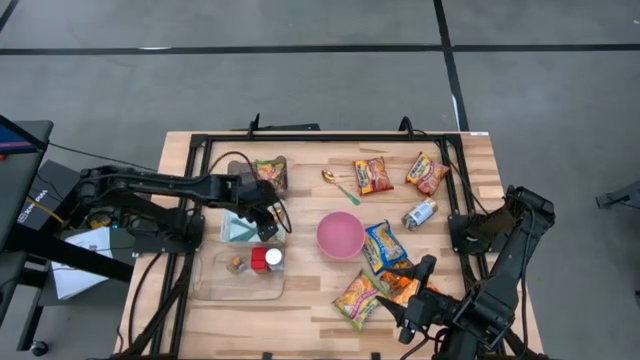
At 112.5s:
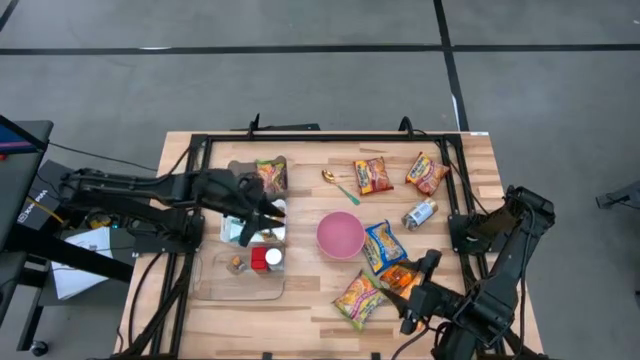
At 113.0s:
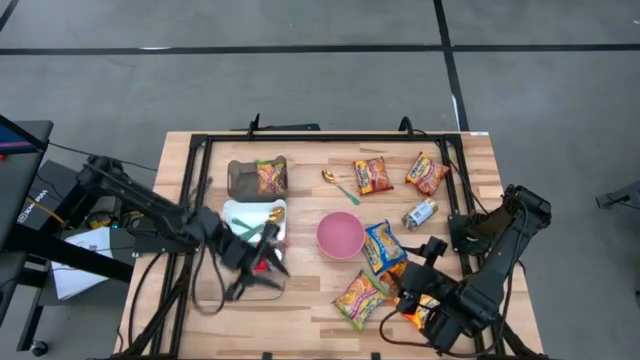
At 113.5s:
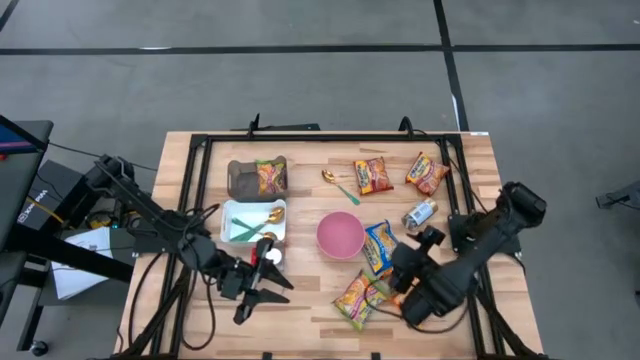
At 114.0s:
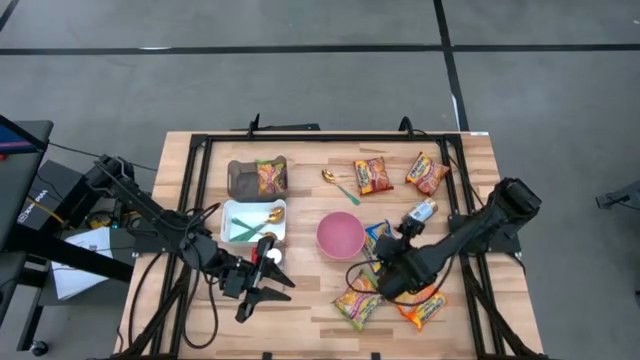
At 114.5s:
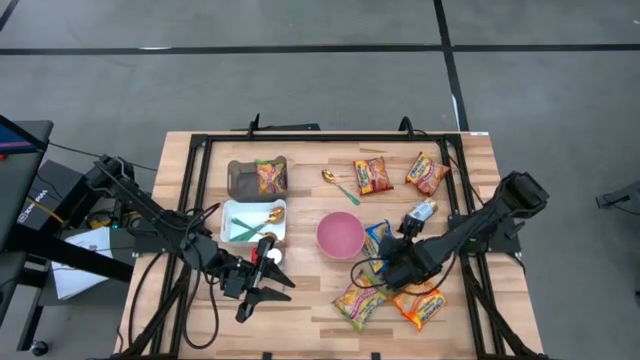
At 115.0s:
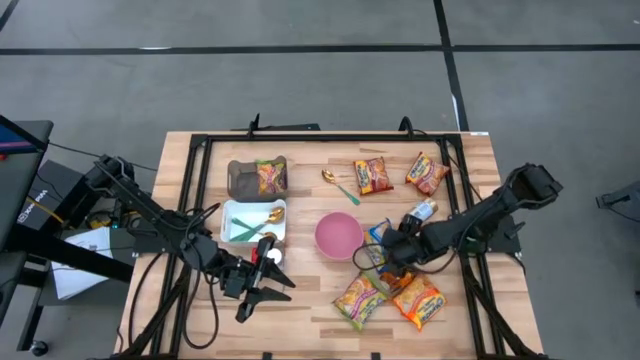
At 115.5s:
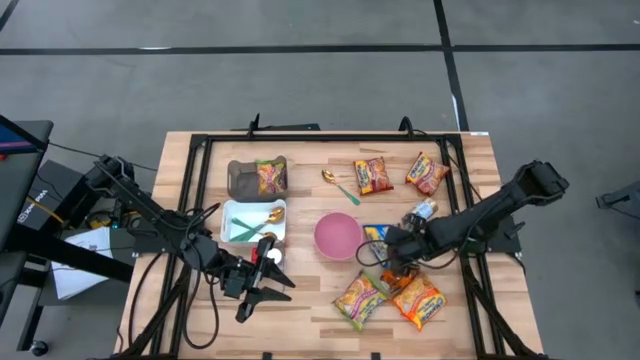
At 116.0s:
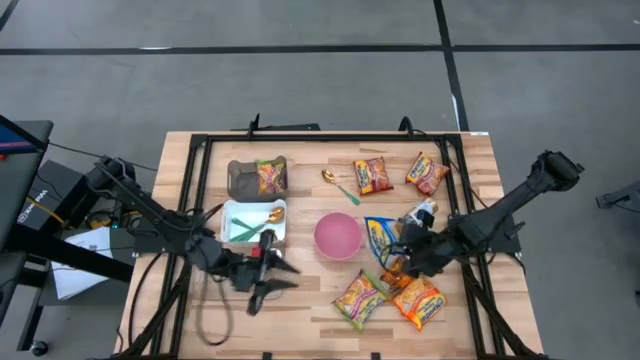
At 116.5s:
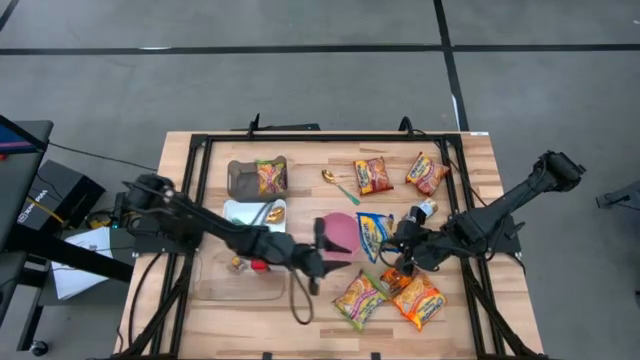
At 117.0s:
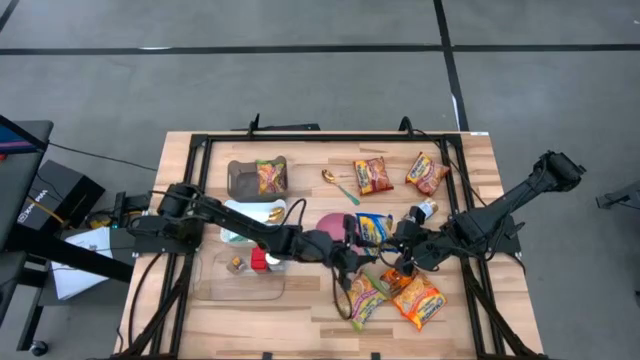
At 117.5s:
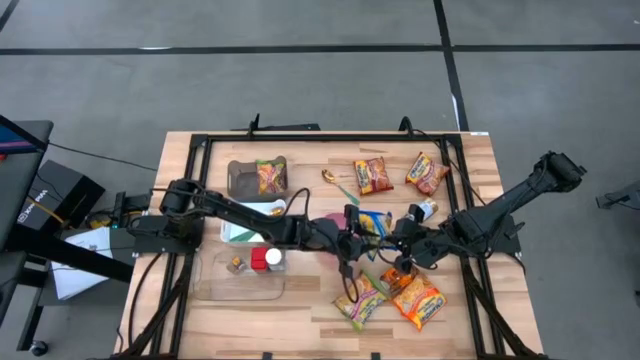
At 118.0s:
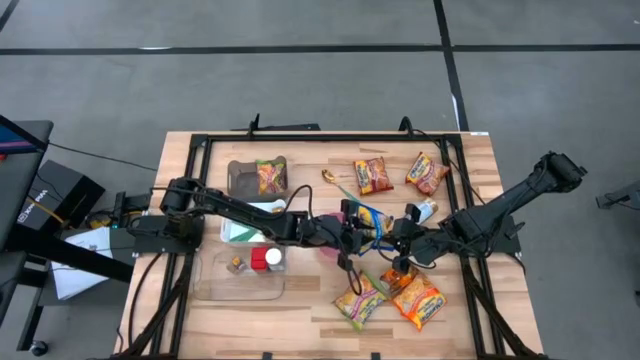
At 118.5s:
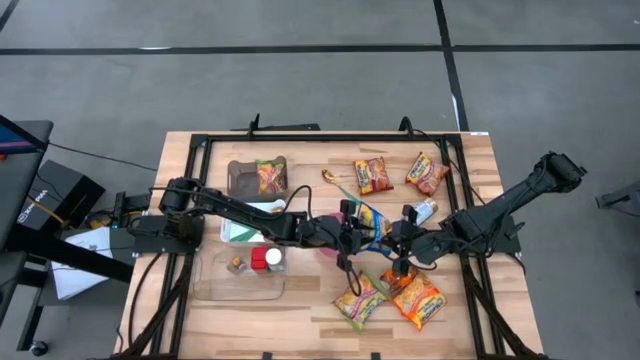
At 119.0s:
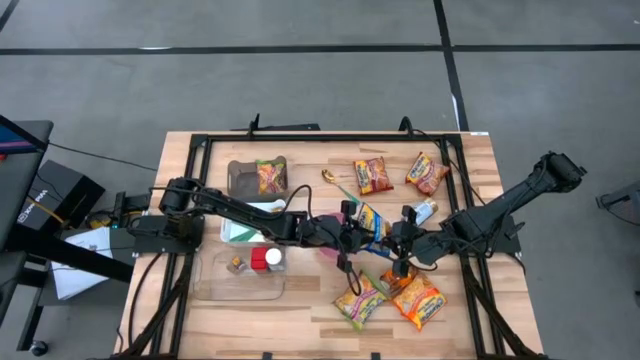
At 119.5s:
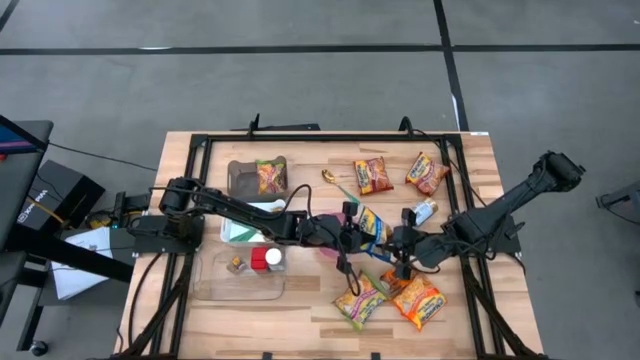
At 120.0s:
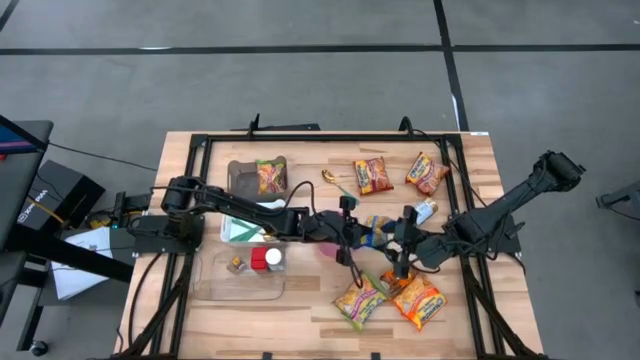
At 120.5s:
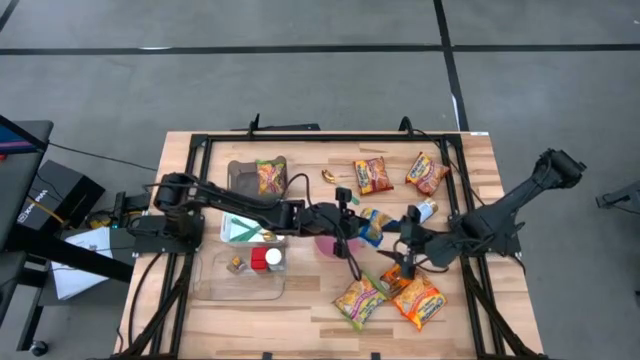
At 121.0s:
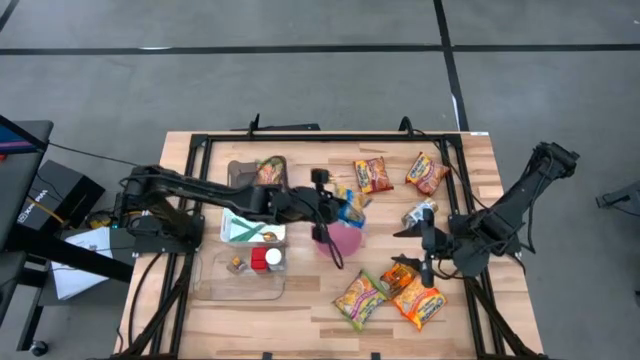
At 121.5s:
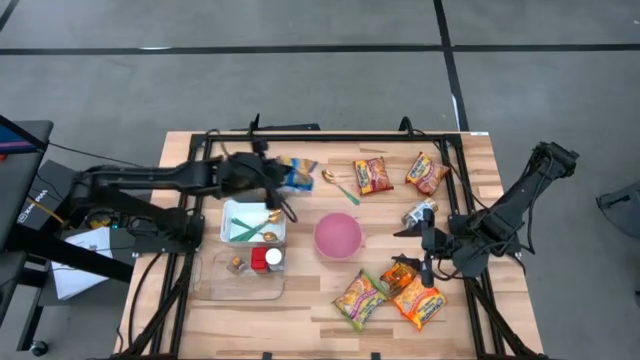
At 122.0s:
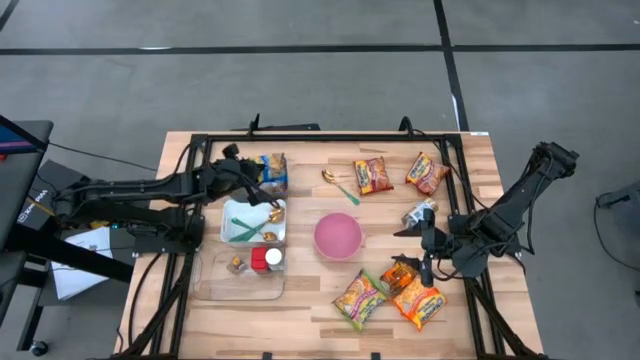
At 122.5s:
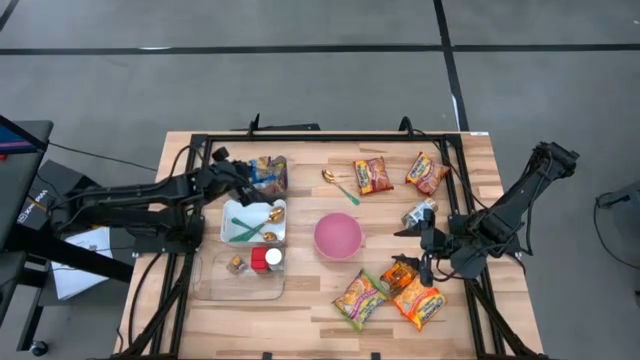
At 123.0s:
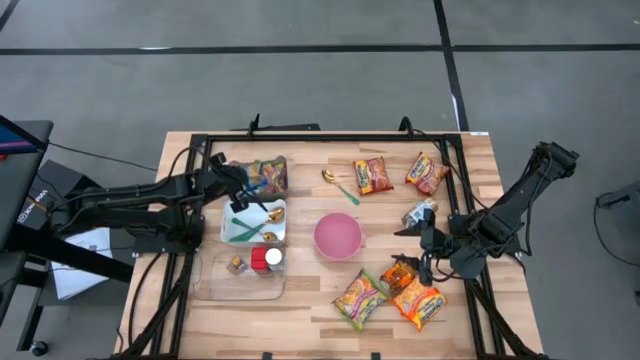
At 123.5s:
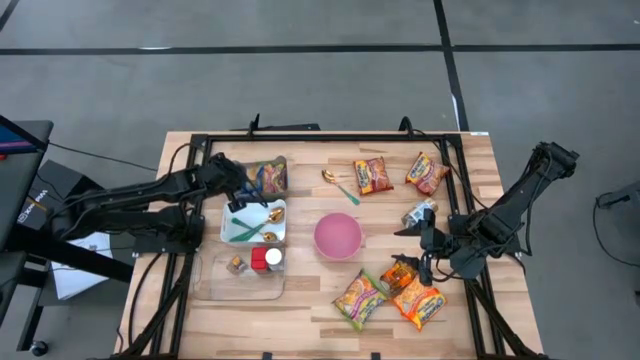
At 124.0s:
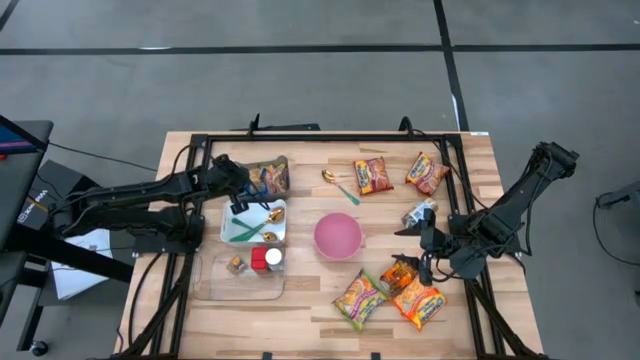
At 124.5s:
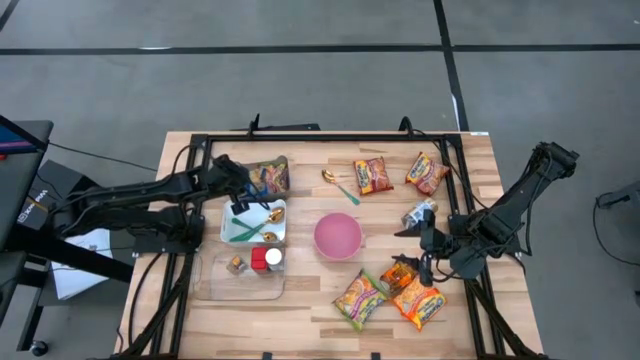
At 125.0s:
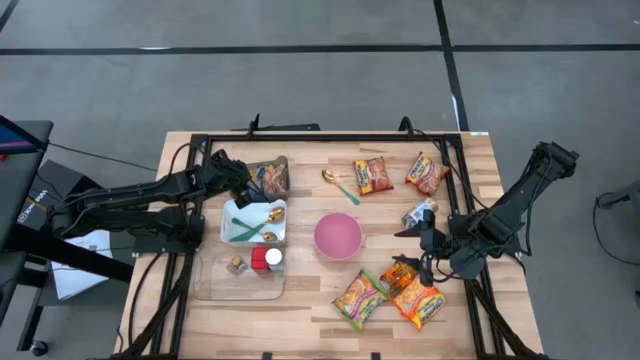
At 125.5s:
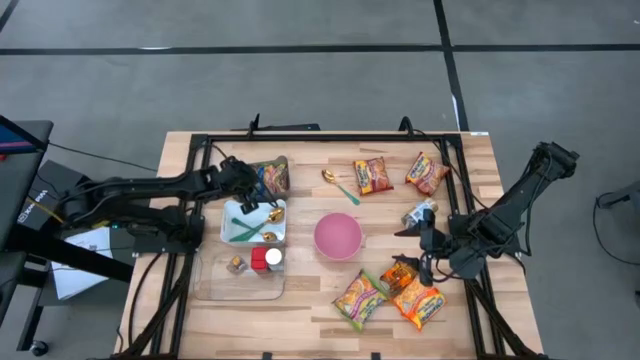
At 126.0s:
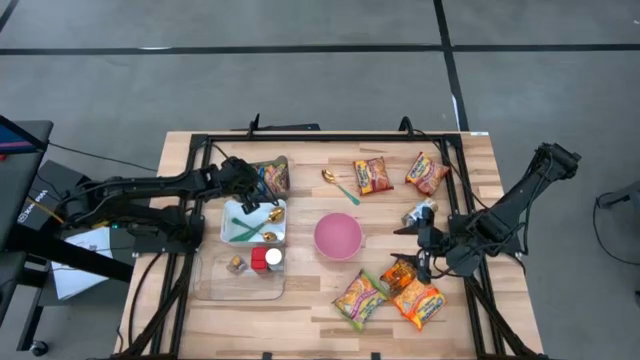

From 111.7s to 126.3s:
Task: Pick & Place Food Item
Put the blue noodle pack into the black transparent bin

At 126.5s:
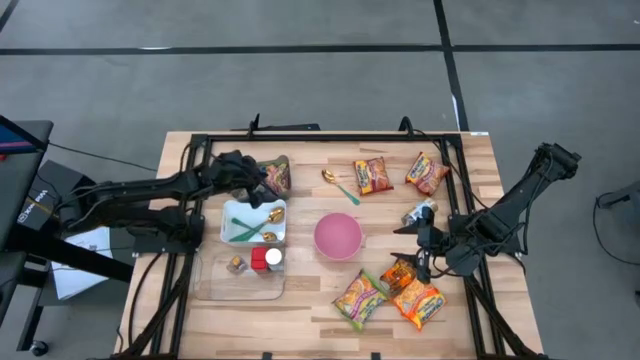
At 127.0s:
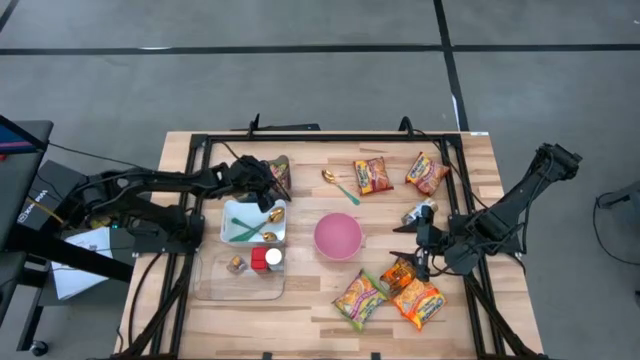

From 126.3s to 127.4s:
Adjust the green noodle pack in the black transparent bin

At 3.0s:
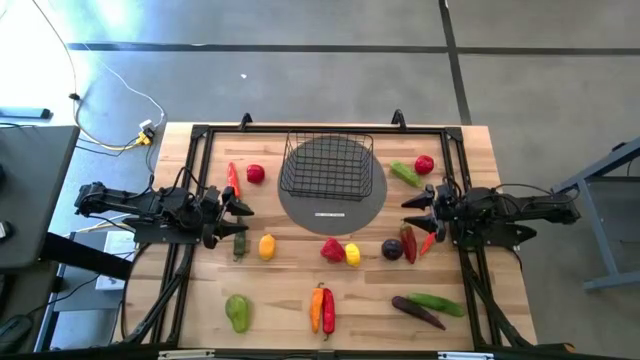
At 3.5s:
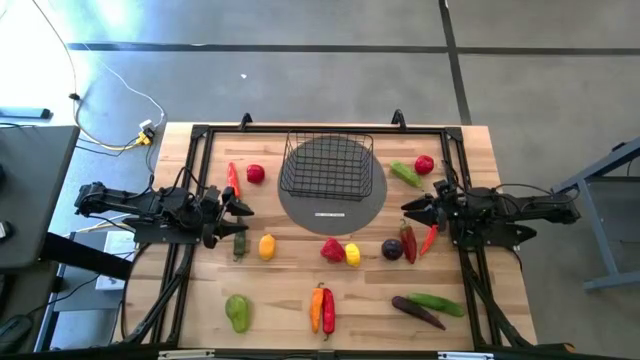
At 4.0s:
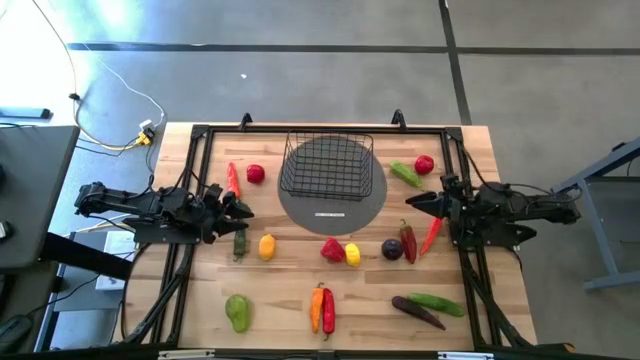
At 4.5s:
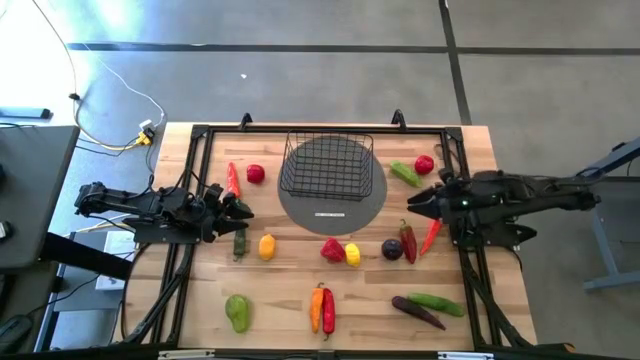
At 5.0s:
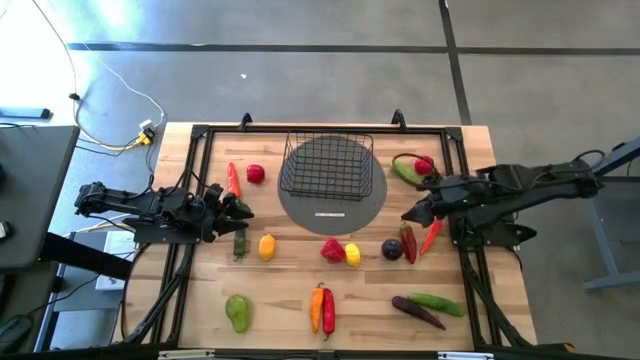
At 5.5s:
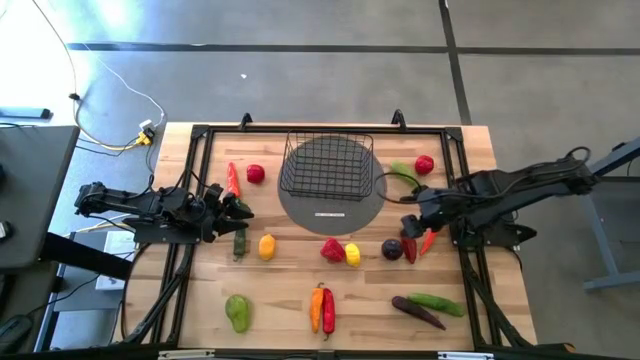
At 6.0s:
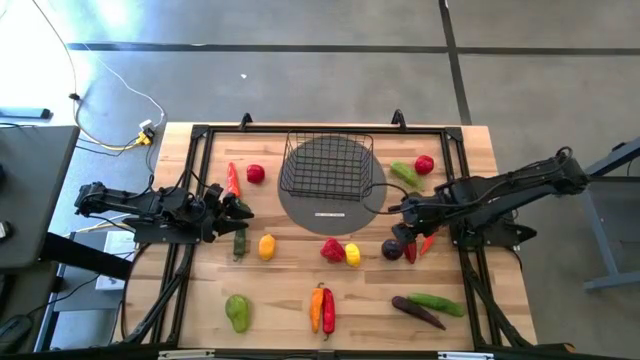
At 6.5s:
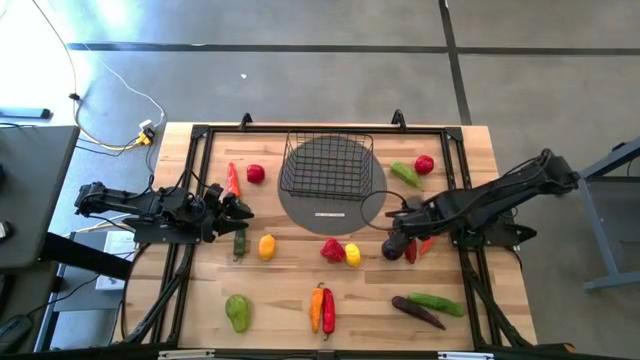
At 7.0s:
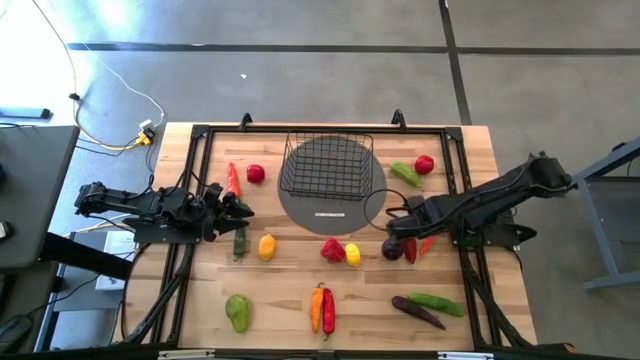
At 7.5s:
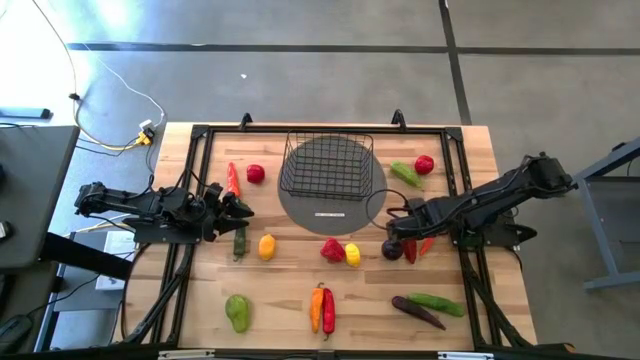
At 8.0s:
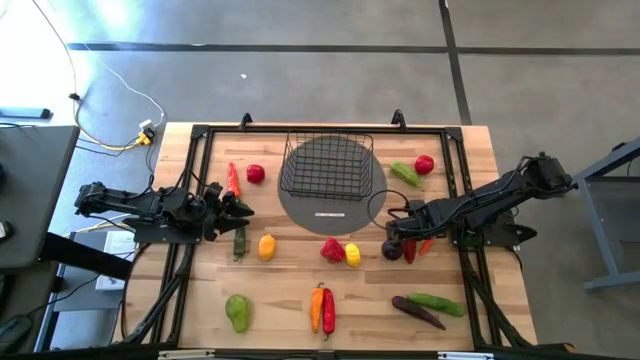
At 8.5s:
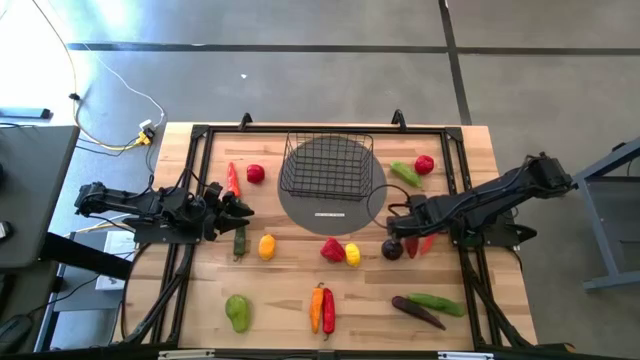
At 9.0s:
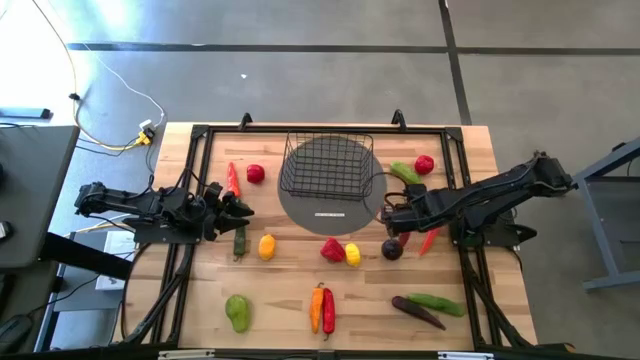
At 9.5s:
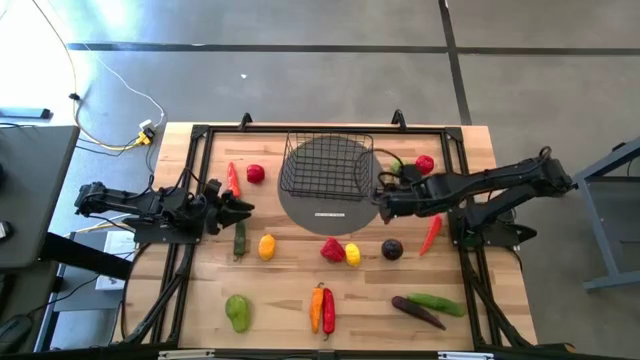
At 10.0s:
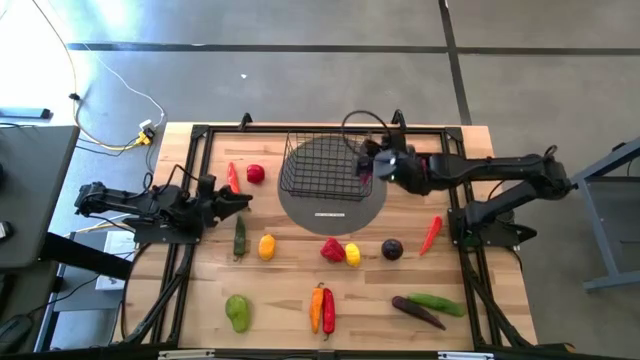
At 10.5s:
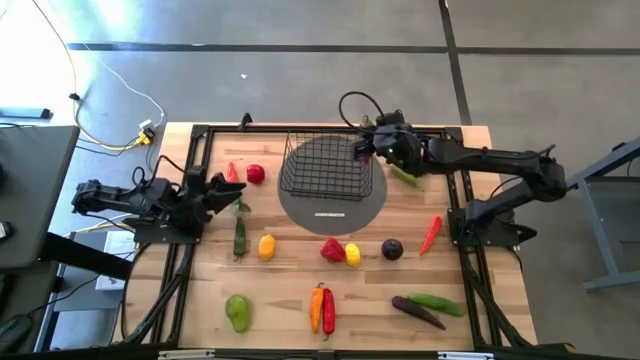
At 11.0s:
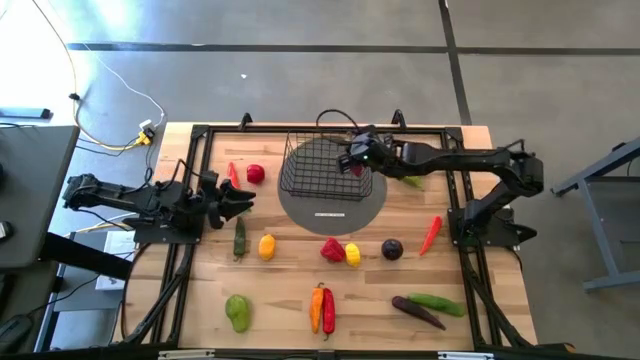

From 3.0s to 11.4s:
Task: Build produce basket
Put the dark red pepper into the wire basket
